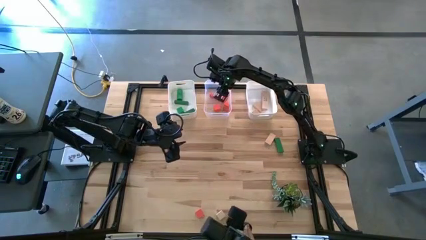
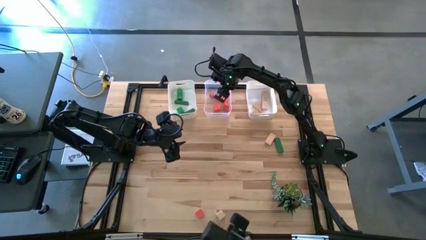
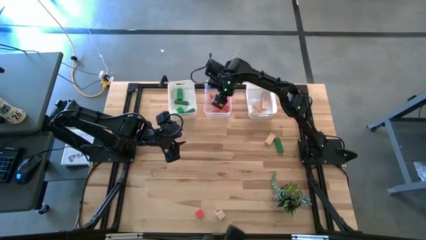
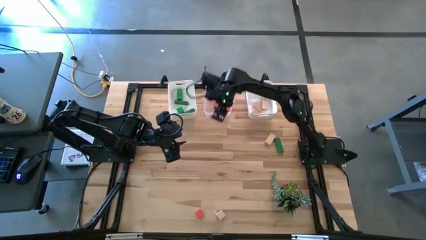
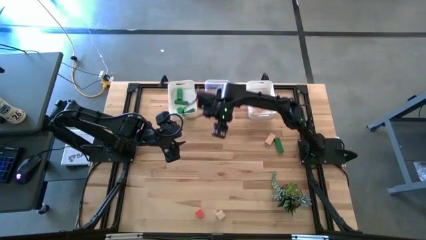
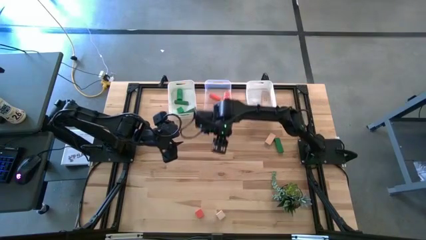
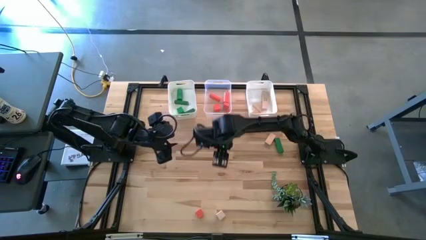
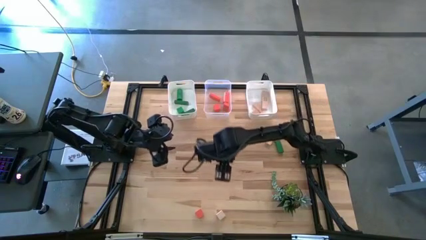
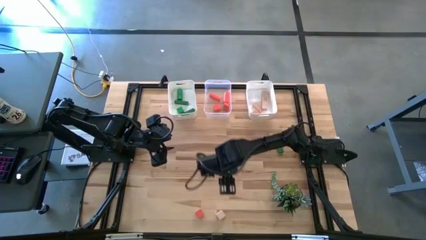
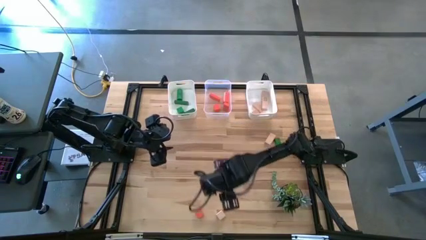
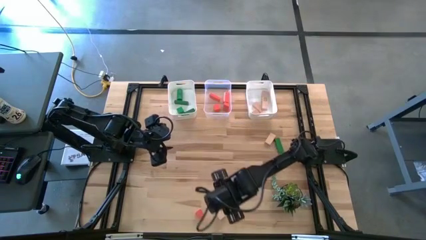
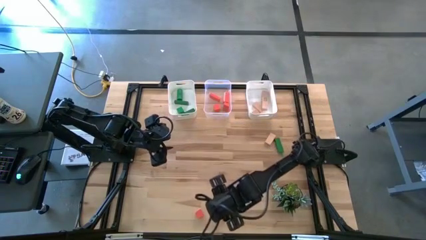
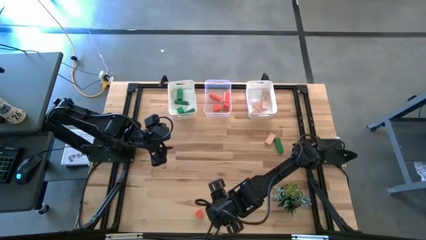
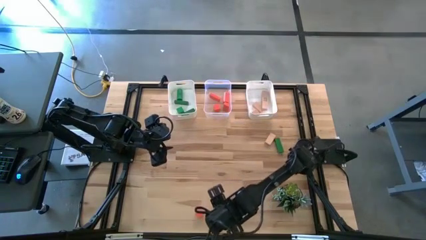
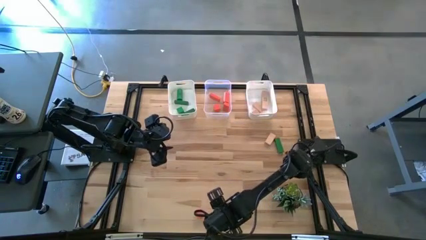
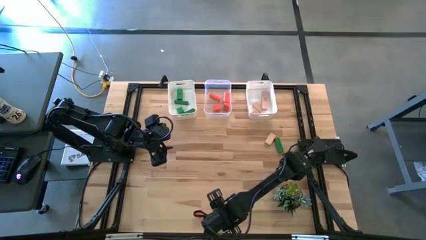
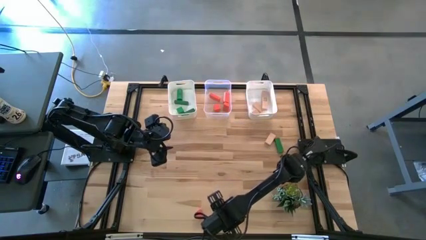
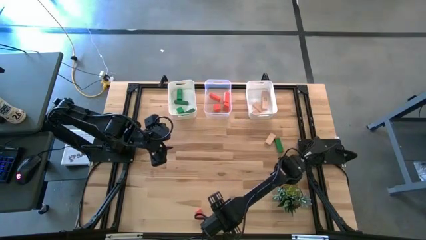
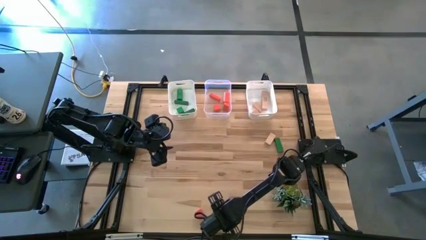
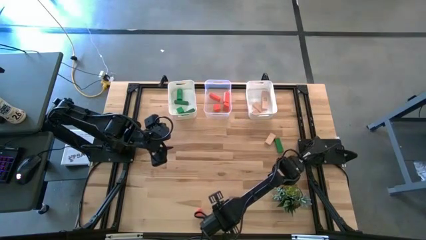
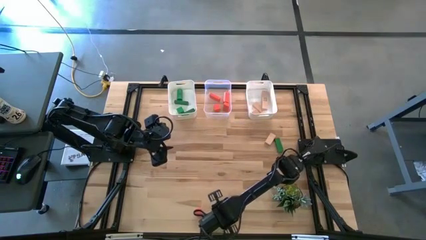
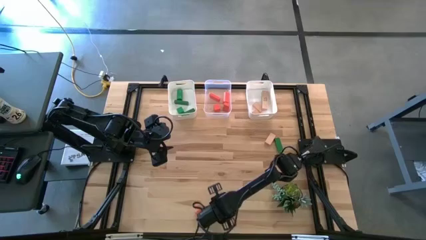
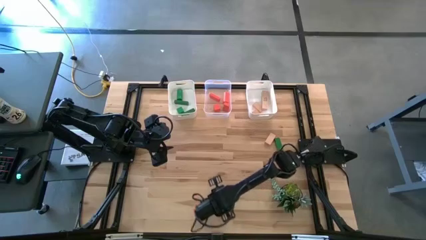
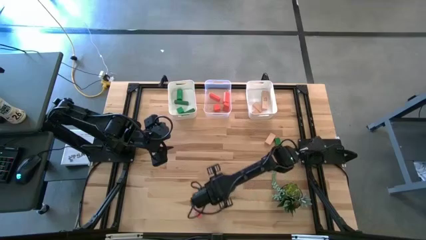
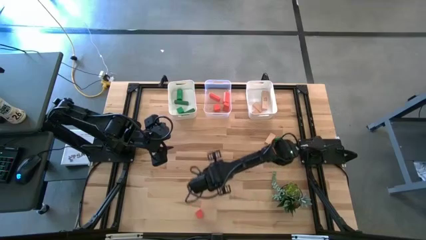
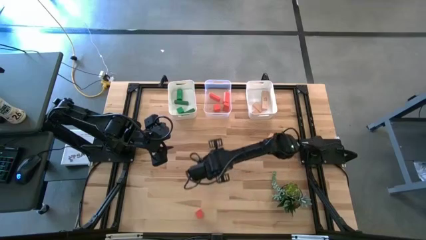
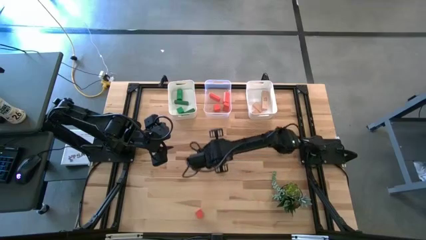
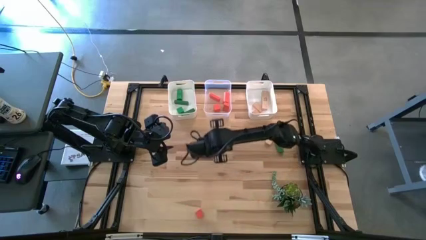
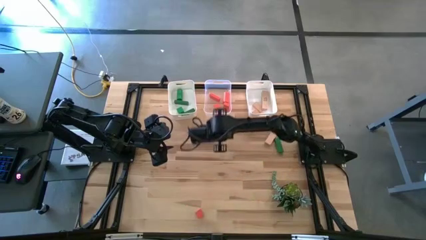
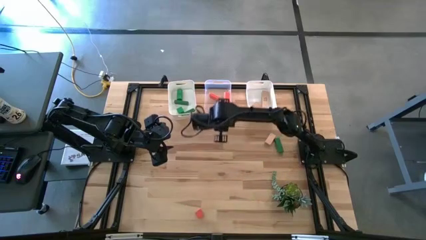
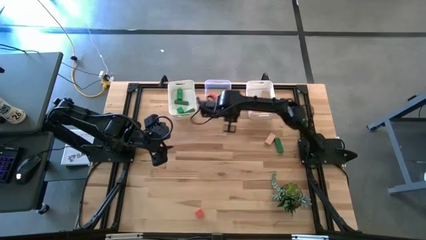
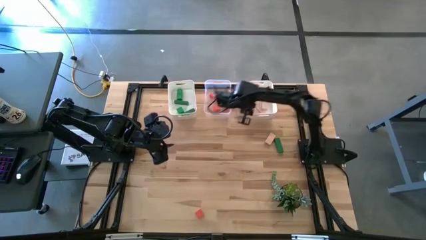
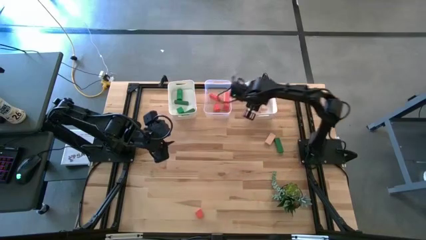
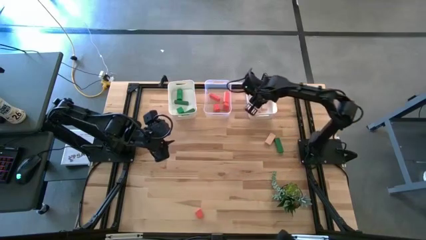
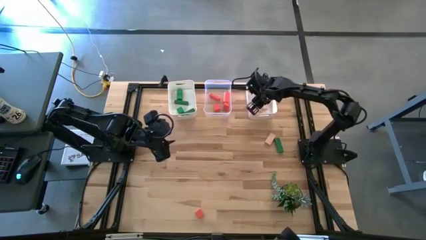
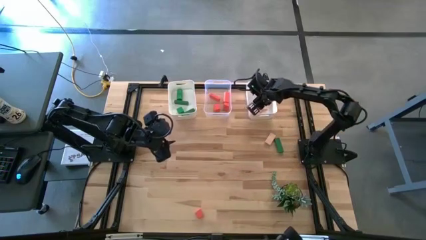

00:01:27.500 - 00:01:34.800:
Task: Sort & place blocks by color
Put the brown block into the right white bin

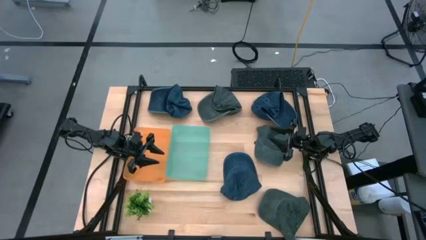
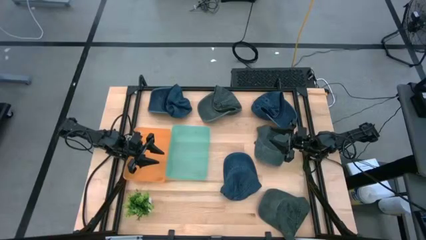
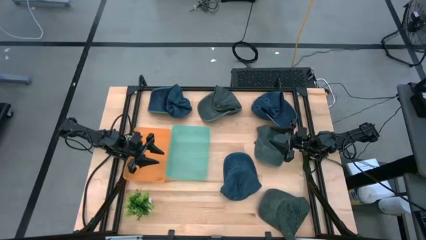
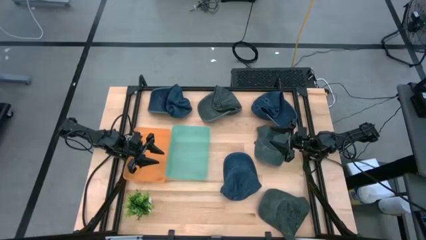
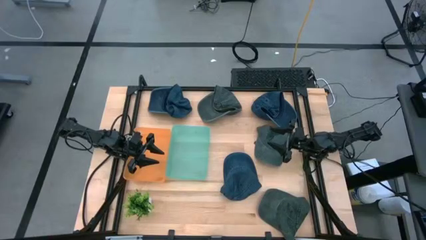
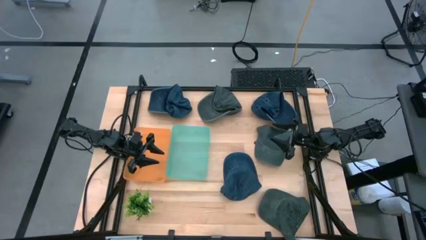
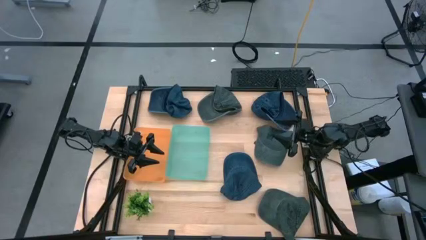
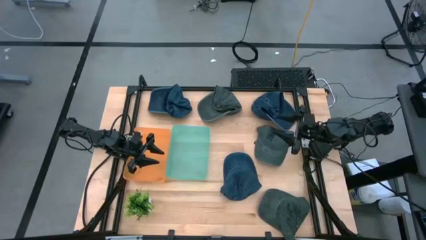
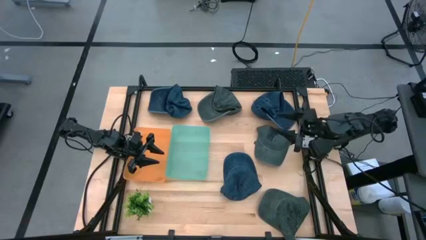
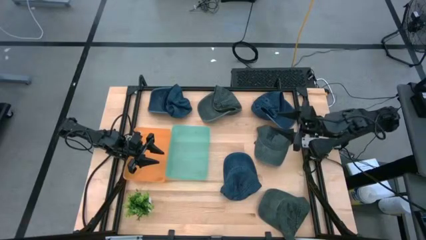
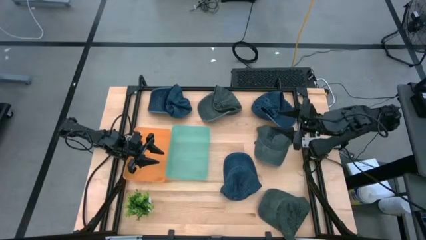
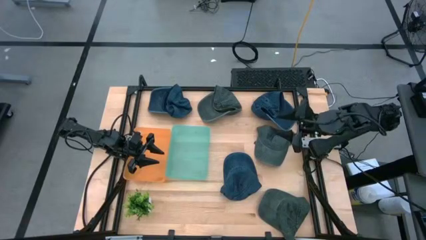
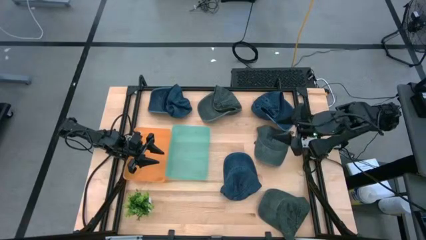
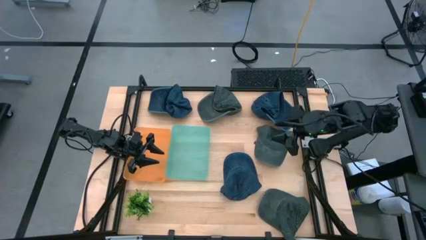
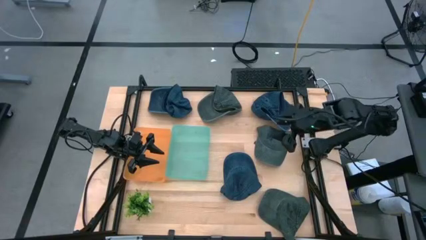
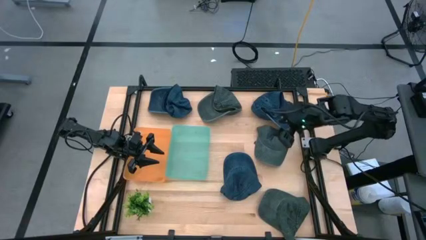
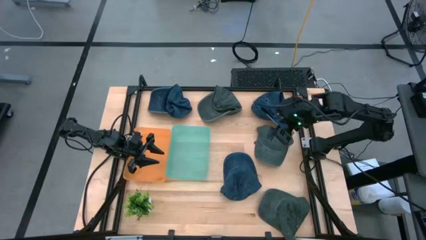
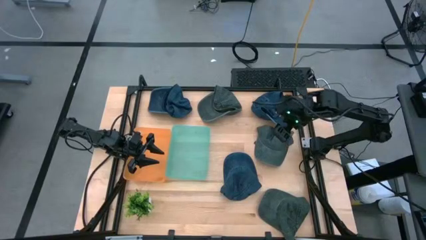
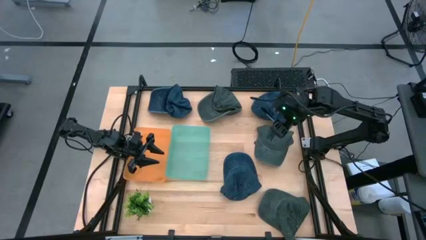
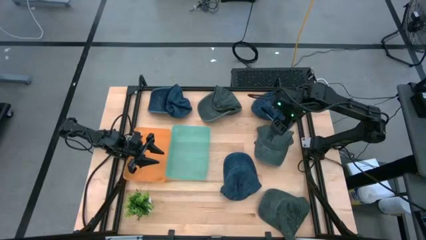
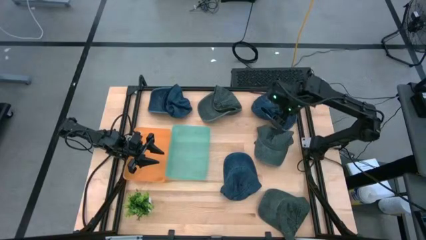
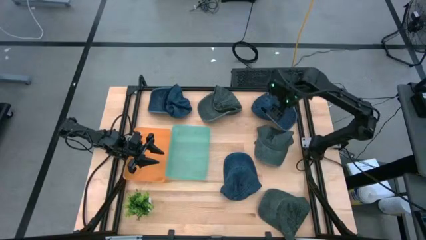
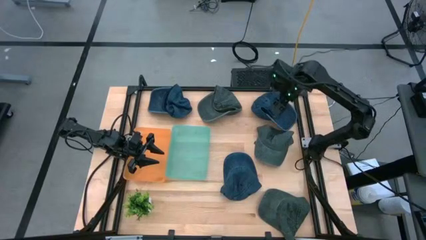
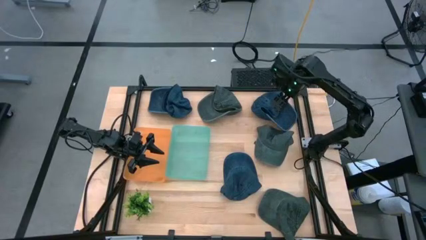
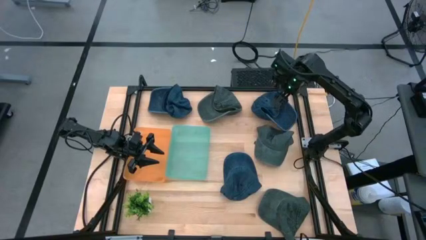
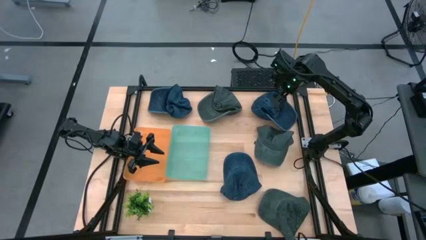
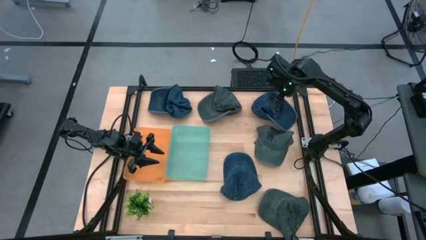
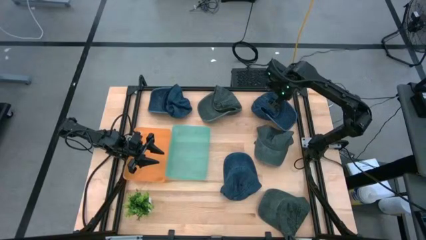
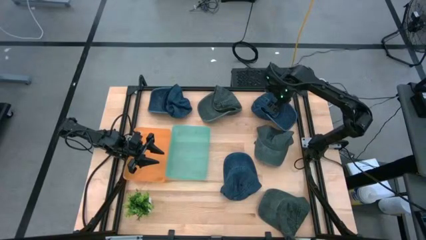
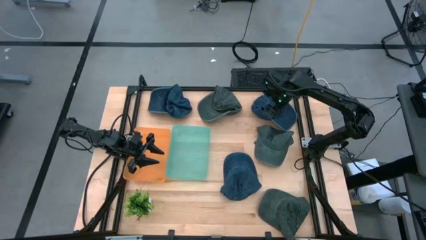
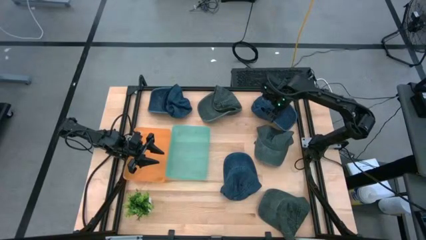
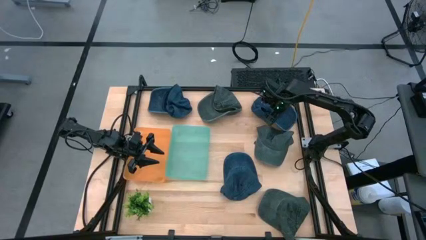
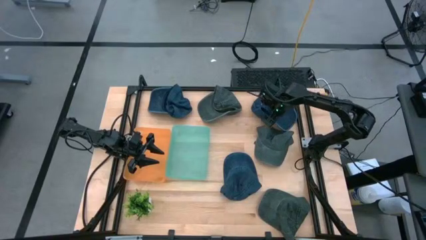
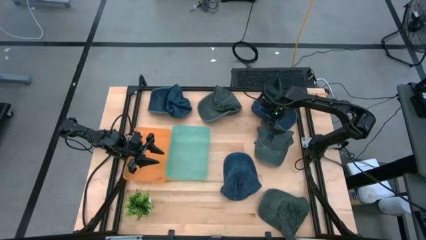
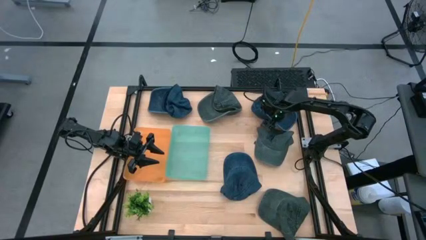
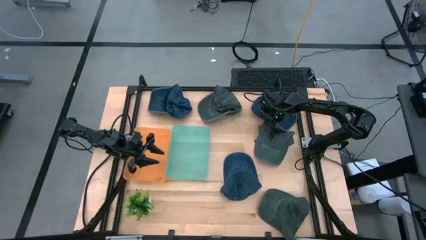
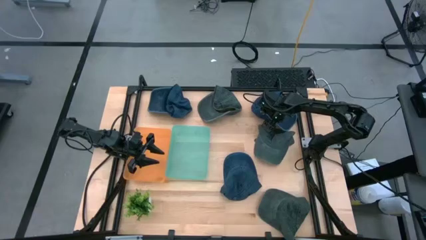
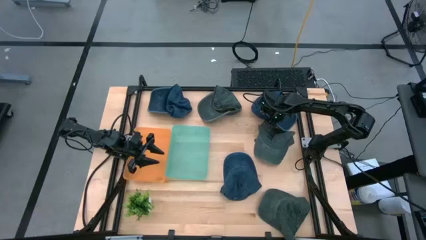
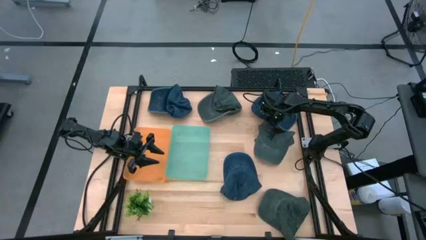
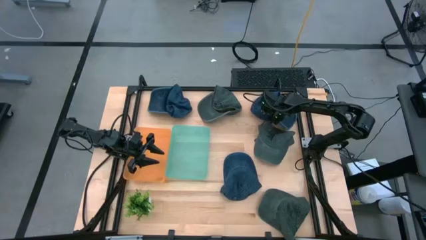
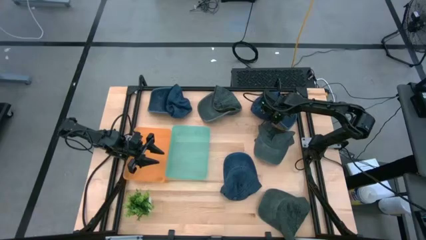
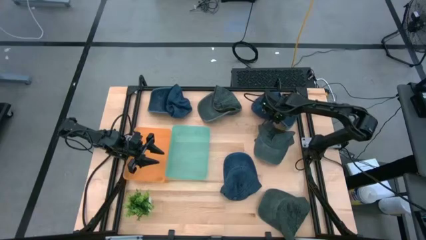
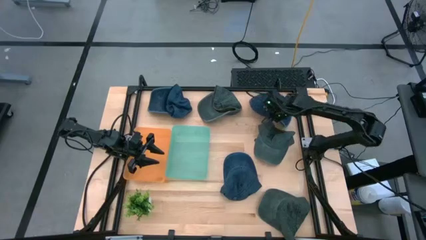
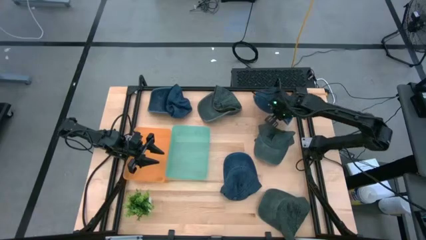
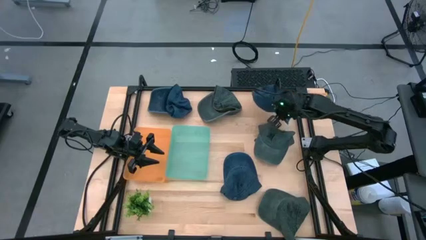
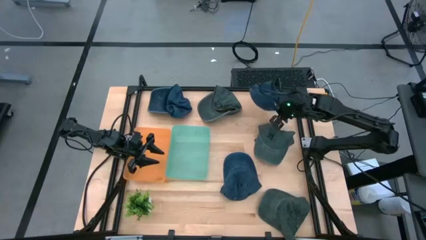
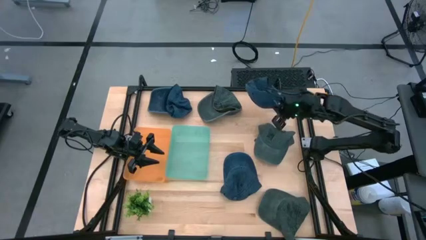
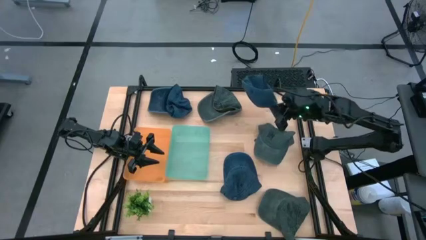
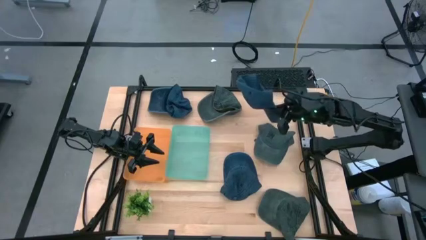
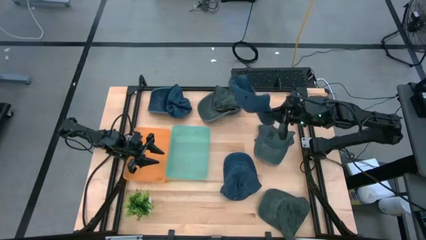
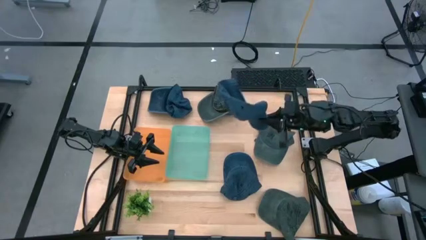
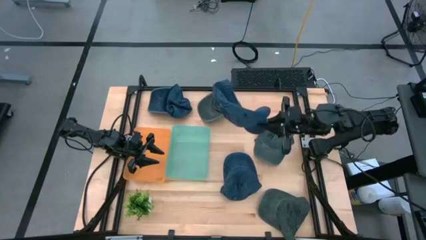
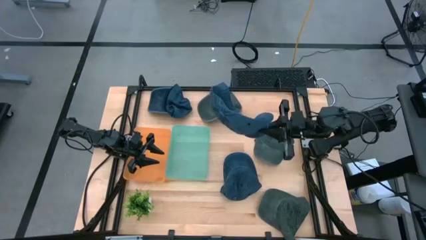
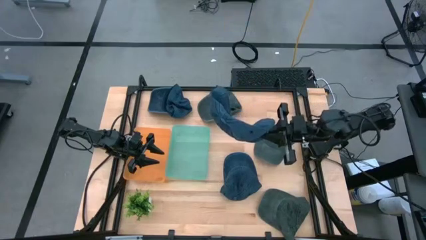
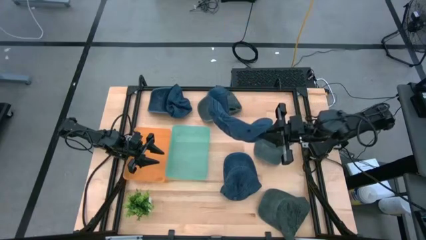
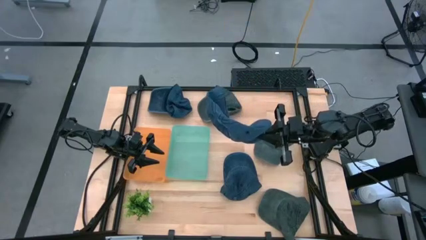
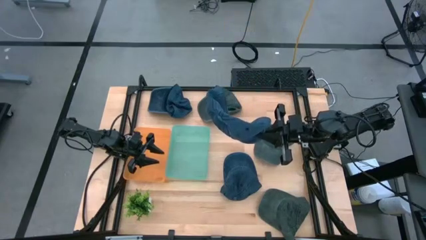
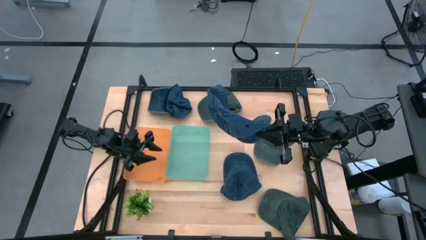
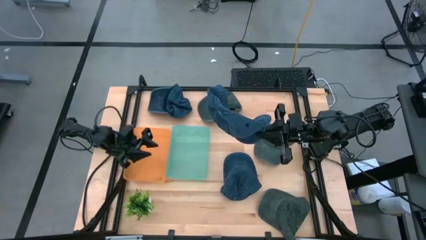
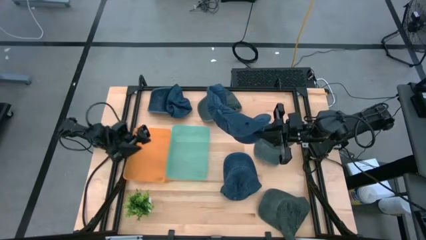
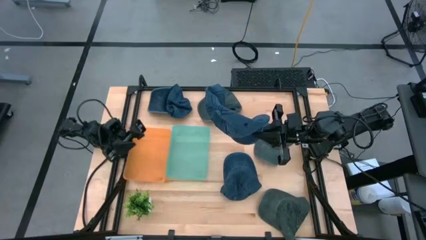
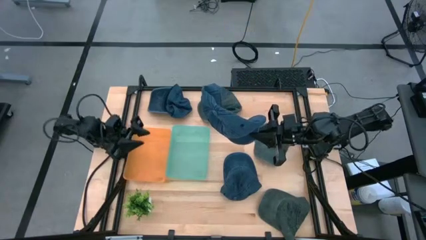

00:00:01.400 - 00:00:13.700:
Task: Pick & Place hat
Put the top right blue cap into the orange bin
